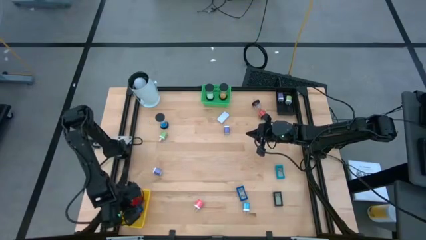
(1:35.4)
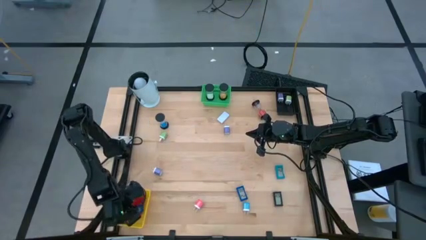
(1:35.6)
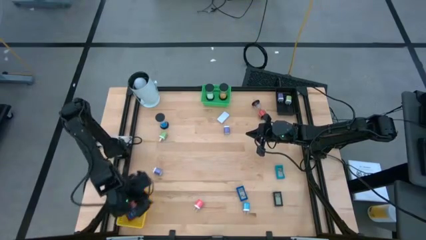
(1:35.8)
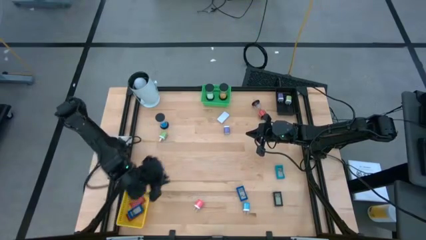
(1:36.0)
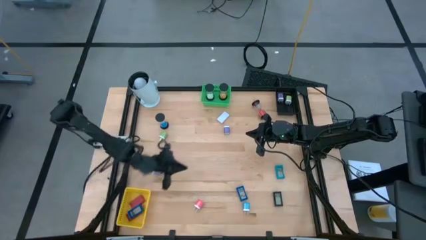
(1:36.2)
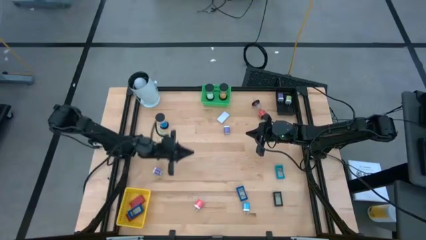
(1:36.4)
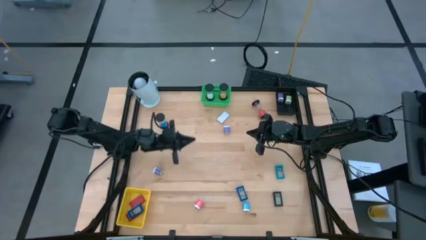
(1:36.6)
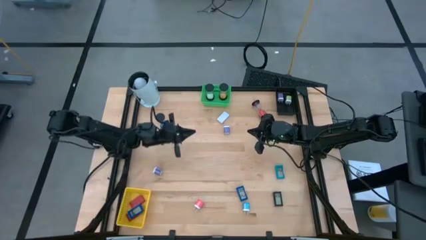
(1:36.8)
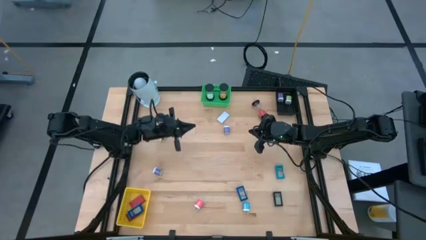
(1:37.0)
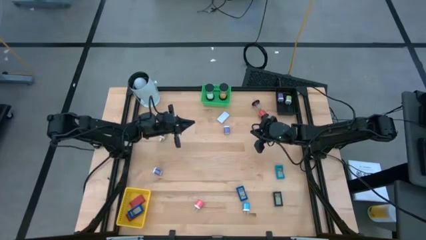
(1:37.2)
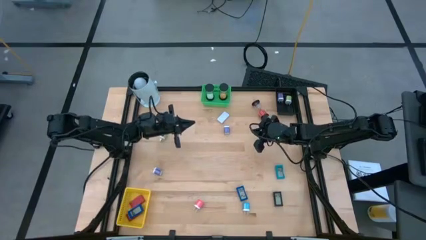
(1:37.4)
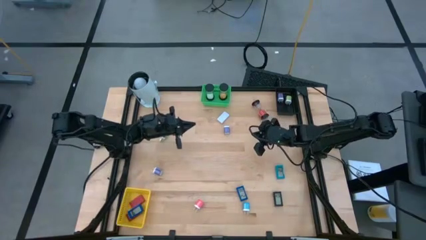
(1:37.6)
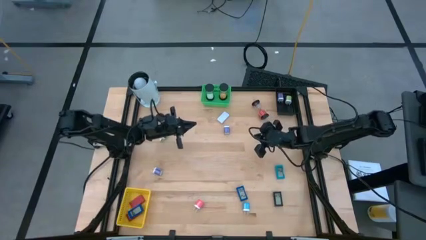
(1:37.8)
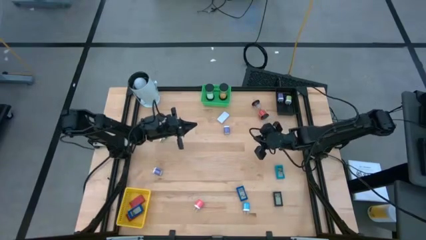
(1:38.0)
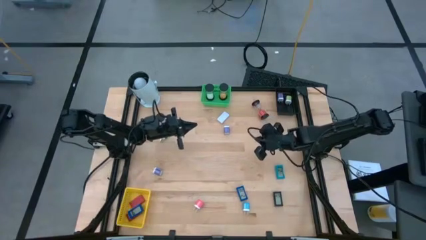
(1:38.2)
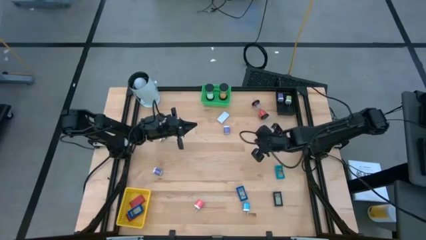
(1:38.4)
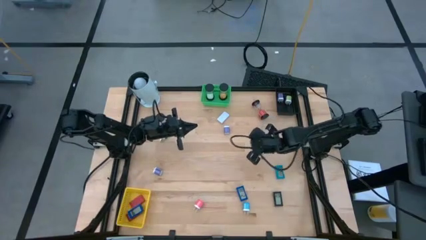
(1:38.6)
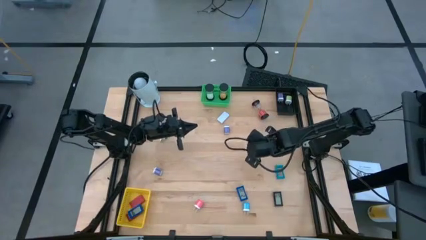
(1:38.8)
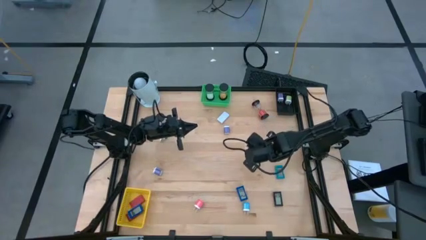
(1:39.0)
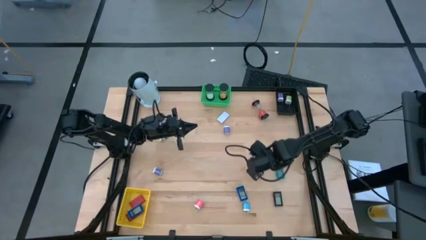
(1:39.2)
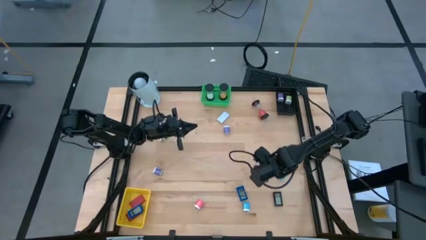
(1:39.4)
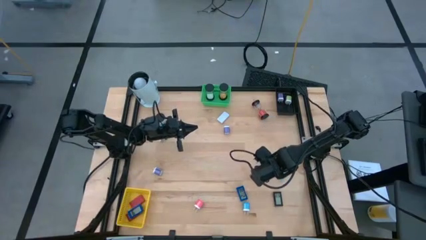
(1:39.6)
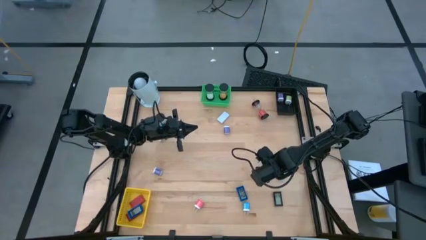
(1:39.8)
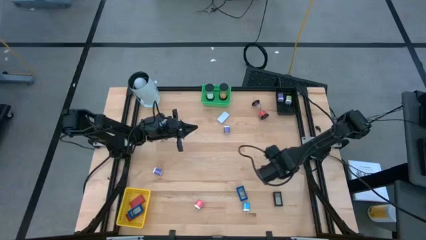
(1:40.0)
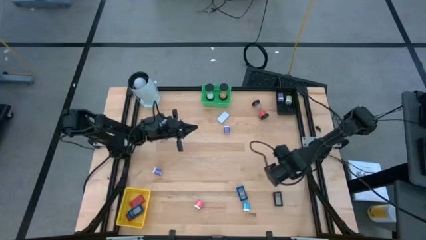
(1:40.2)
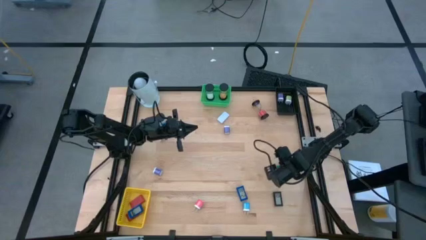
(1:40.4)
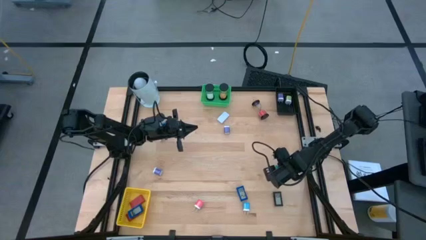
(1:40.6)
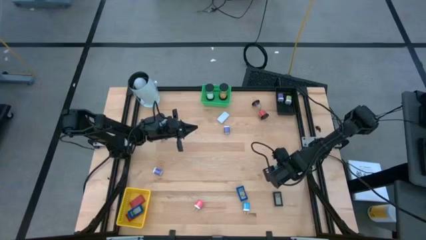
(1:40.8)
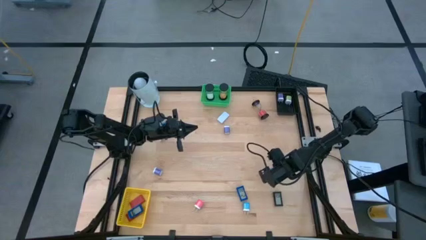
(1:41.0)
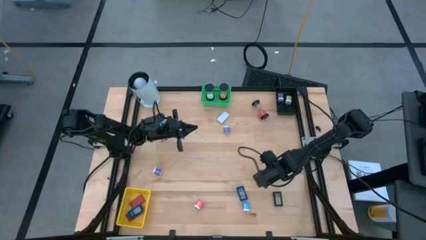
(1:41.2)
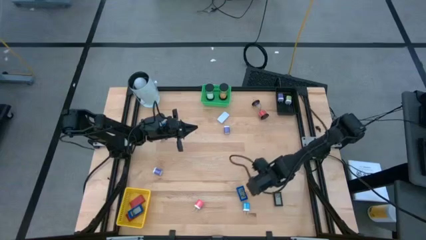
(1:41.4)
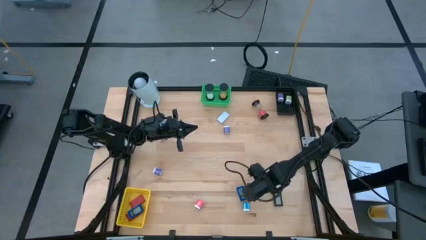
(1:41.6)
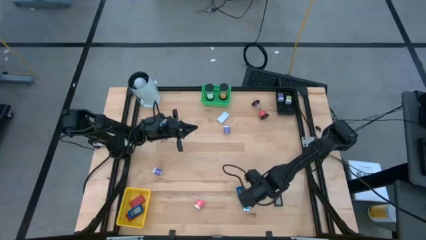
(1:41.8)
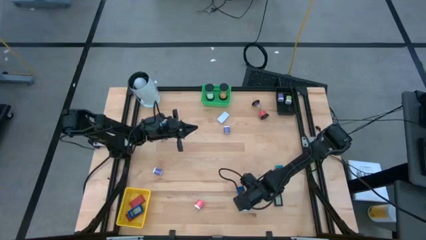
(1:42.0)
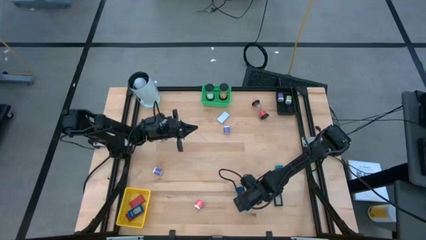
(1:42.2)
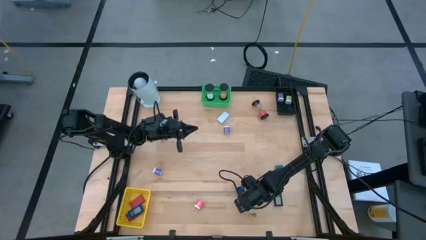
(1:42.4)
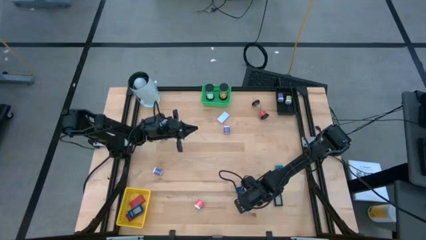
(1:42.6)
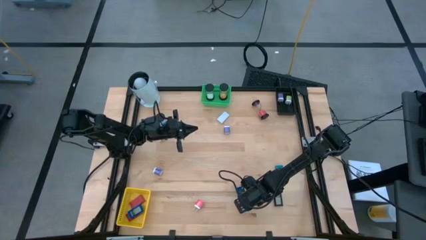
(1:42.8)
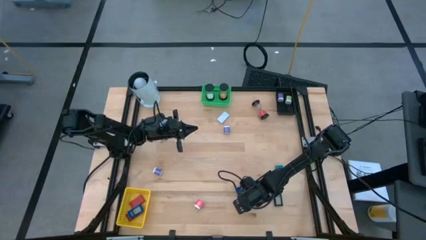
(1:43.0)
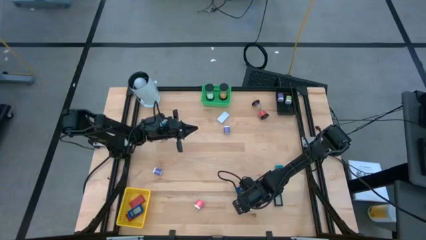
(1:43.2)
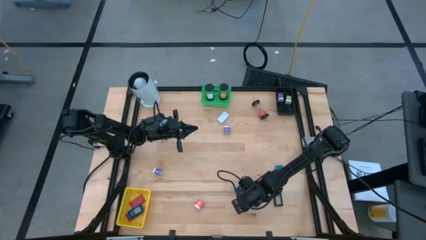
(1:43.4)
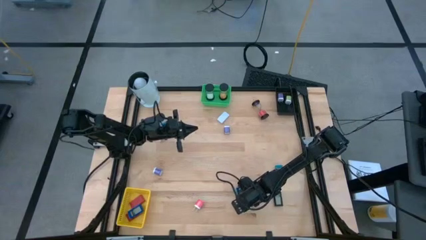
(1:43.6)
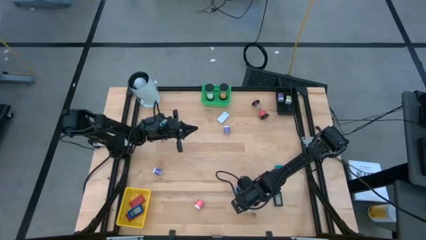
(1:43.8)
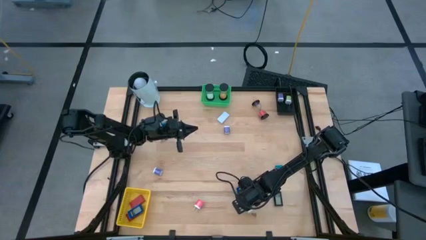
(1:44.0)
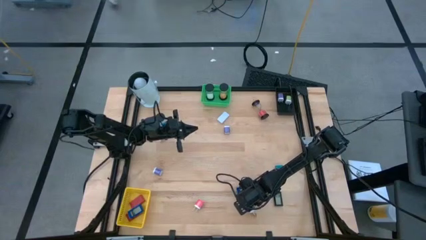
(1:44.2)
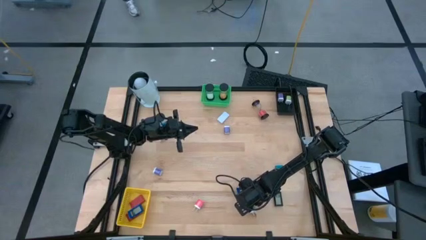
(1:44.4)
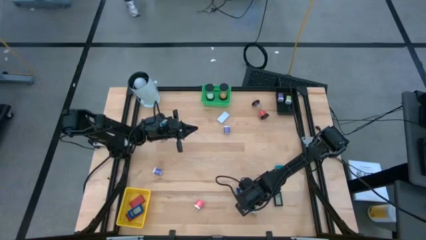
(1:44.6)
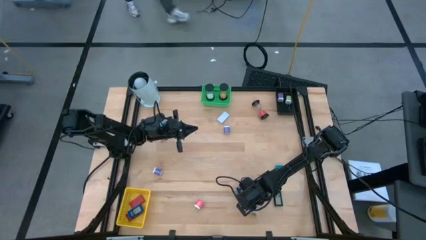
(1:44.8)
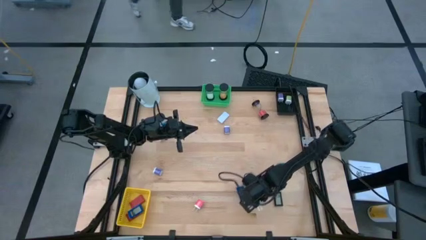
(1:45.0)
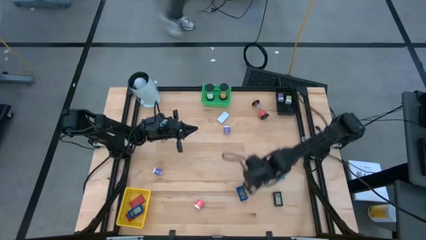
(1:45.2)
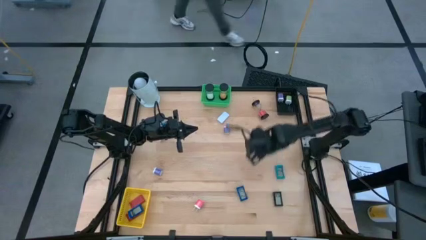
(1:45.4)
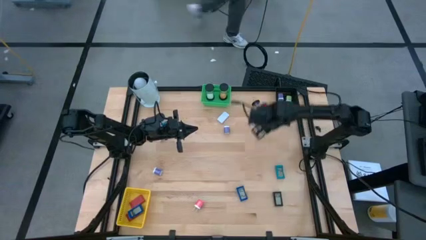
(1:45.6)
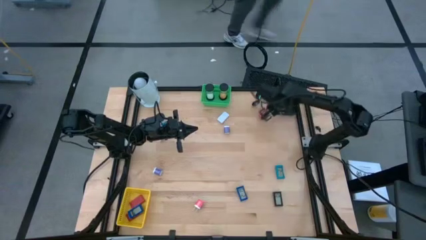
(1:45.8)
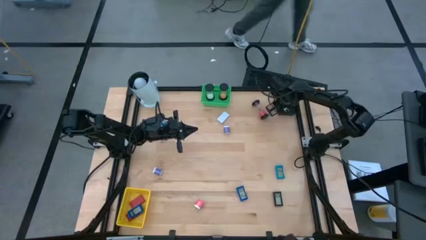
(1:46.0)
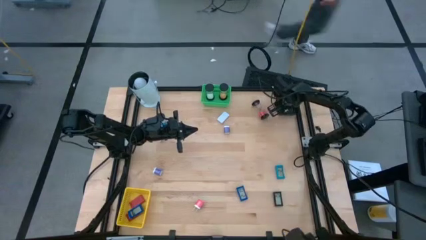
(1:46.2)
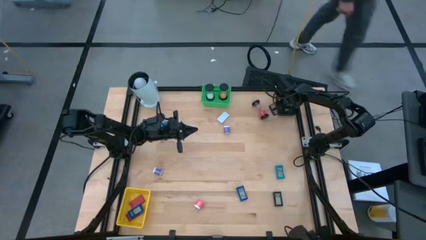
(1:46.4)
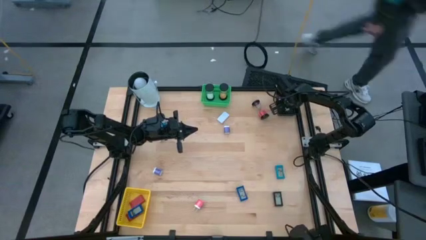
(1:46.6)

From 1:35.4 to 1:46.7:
Task: Pick & Place Office items
Put the blue adapter into the black basket

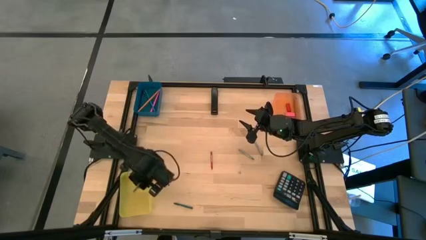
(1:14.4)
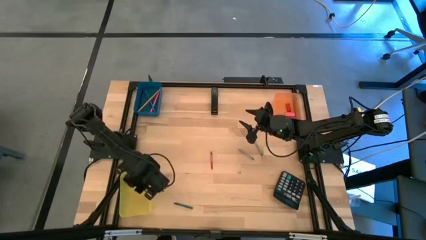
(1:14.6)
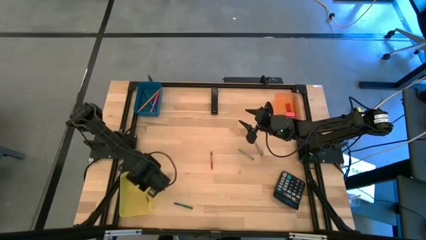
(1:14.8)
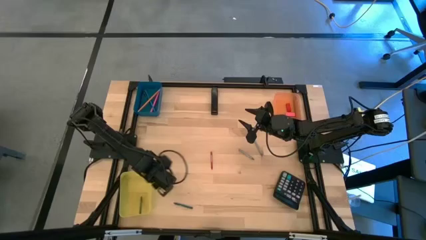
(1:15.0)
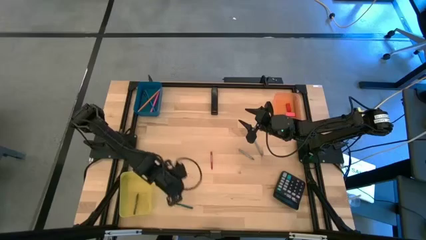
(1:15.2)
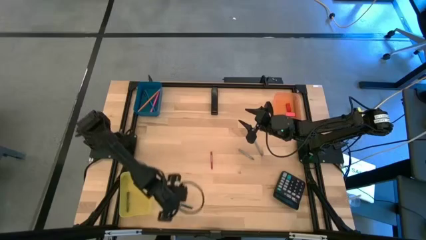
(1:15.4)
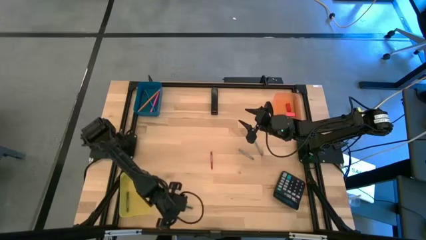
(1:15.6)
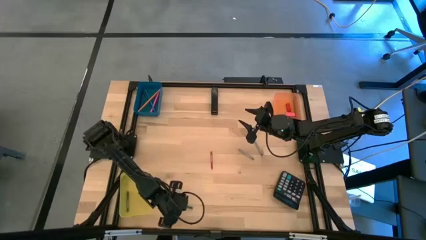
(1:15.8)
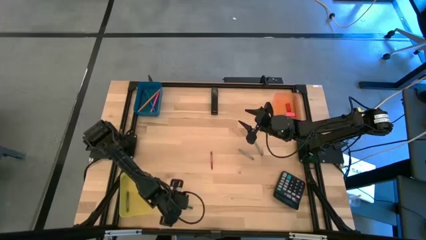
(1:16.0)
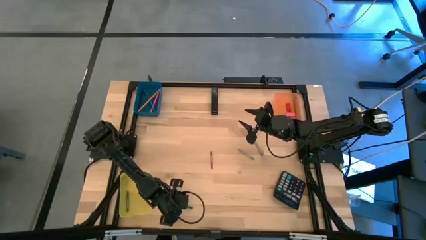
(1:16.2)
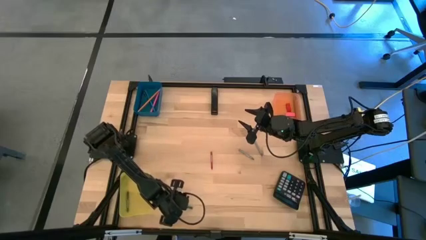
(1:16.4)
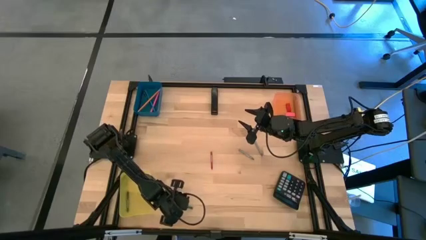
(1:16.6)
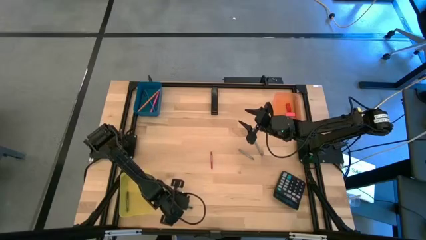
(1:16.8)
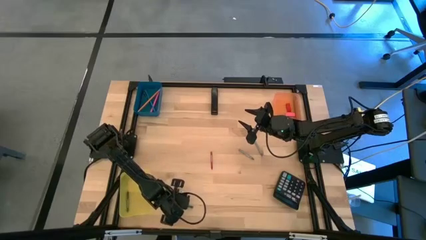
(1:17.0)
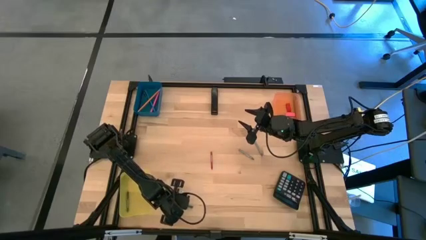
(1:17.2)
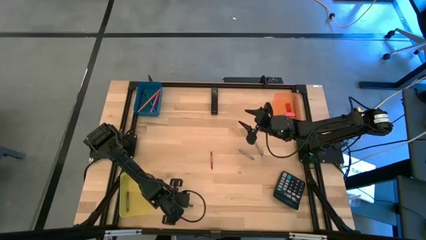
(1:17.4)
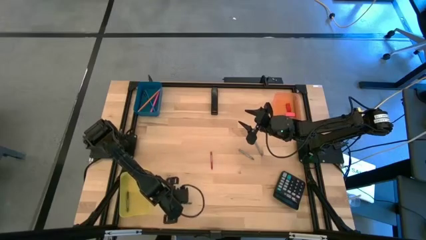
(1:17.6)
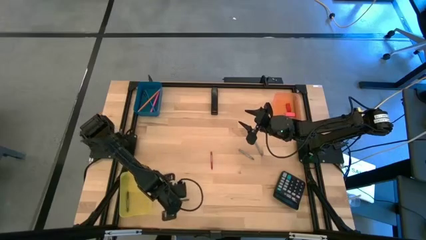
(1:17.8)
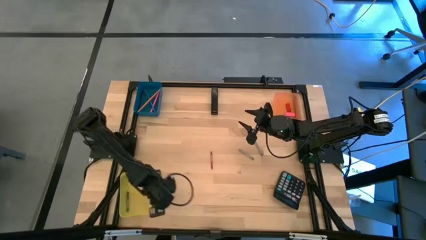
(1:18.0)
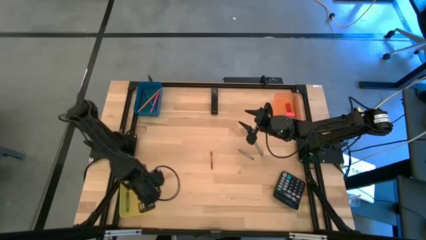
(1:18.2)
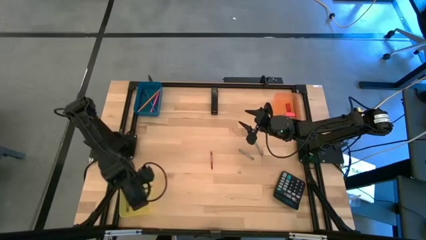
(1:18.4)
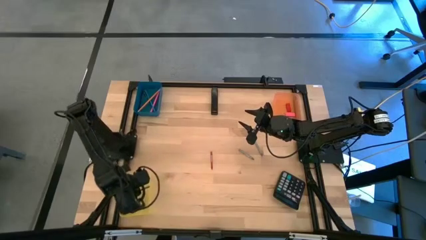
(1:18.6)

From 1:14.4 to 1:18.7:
Task: Sort crayons/erasers/pens/pencils in bins
Put the green crayon into the yellow bin

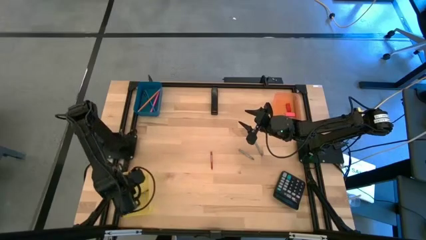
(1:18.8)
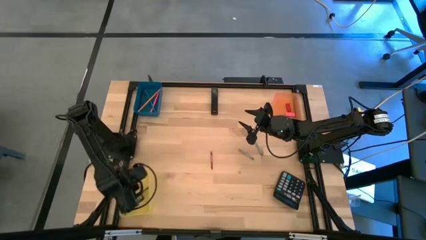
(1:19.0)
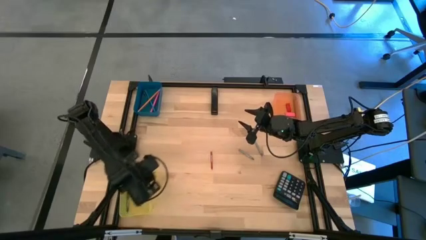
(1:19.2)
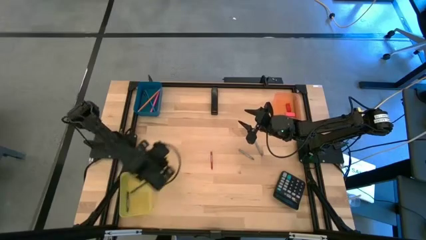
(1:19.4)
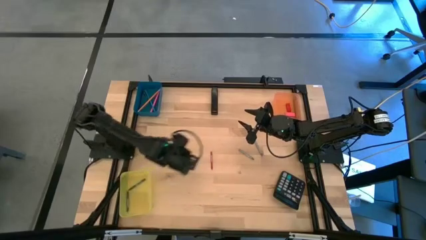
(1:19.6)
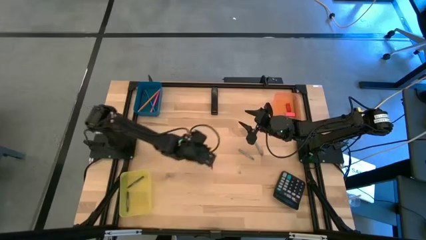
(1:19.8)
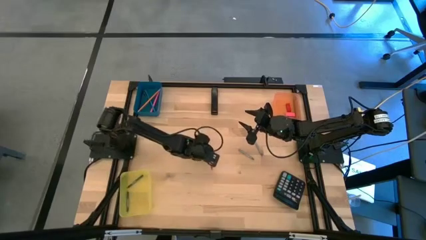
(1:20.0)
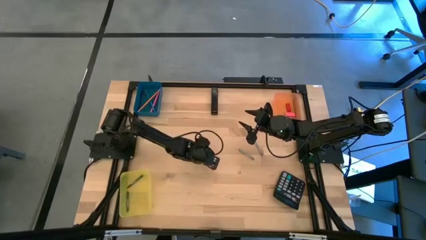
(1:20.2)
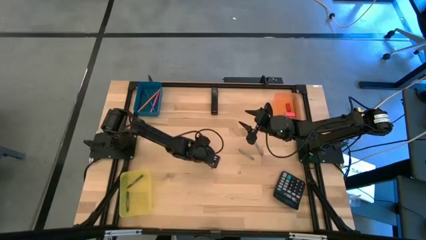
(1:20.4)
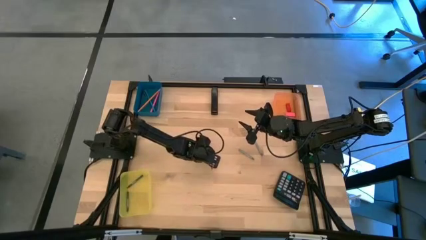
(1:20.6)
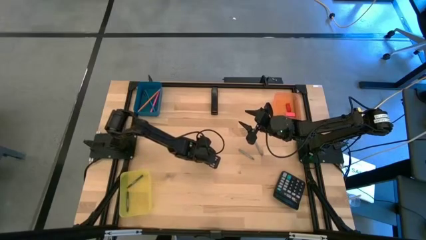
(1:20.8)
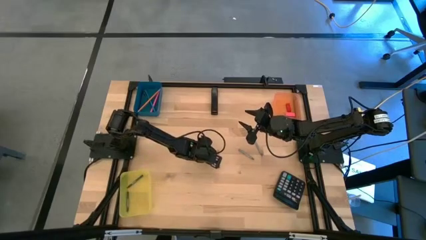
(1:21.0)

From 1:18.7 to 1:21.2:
Put the red crayon into the yellow bin
